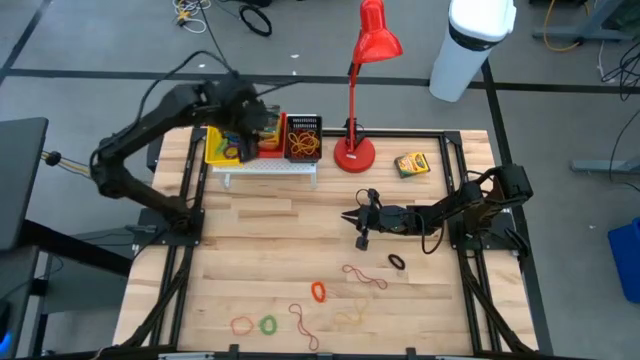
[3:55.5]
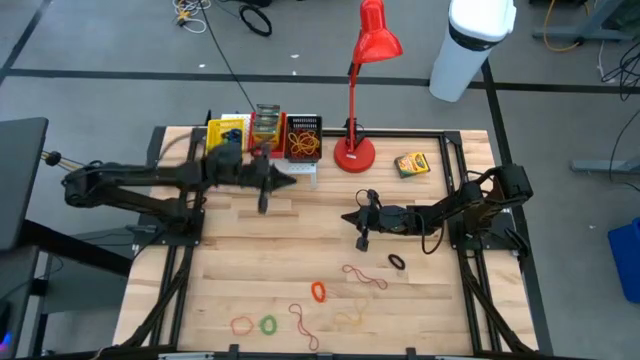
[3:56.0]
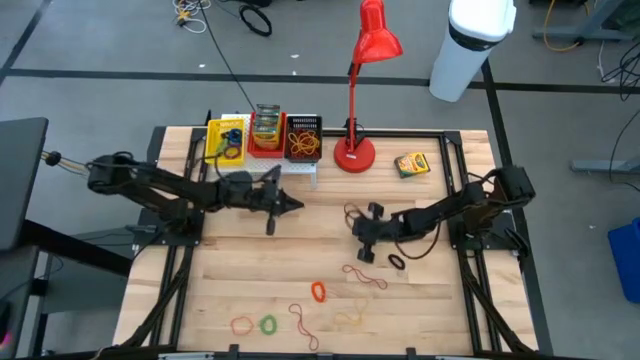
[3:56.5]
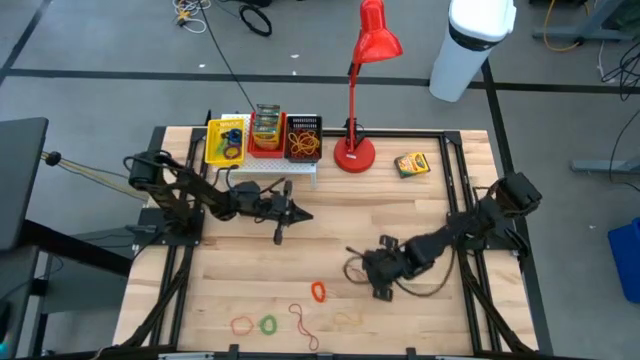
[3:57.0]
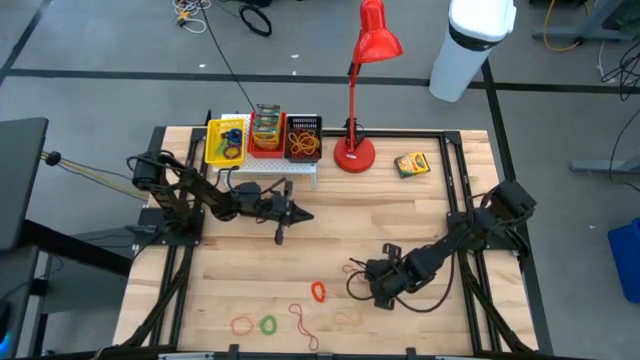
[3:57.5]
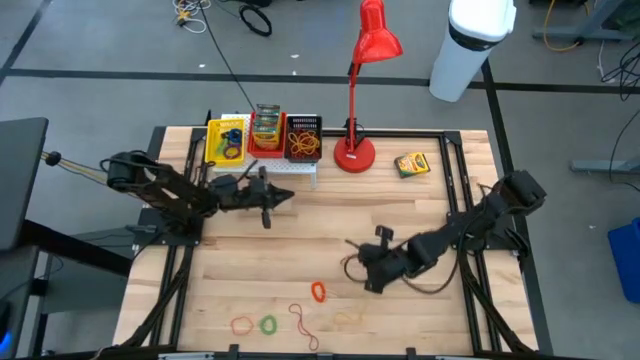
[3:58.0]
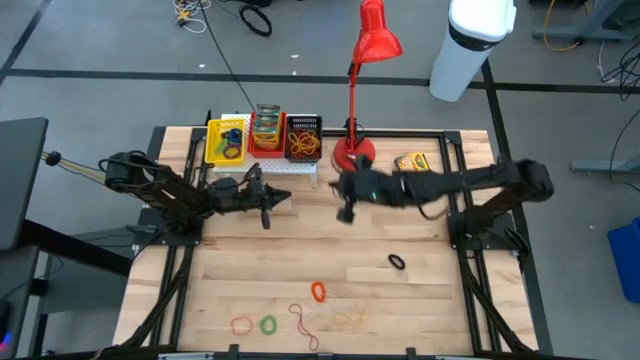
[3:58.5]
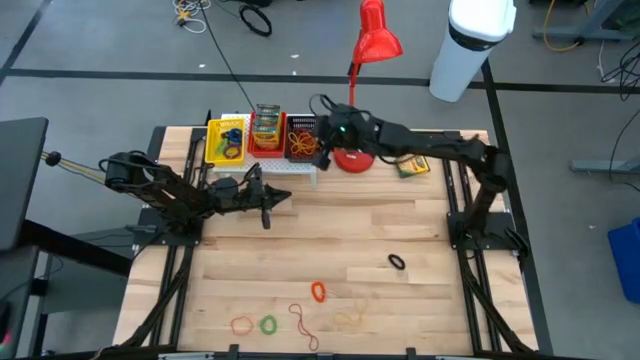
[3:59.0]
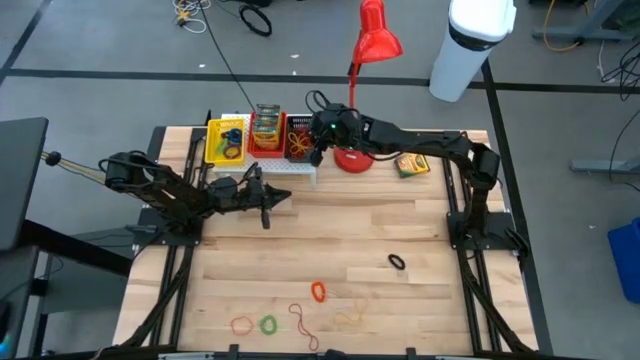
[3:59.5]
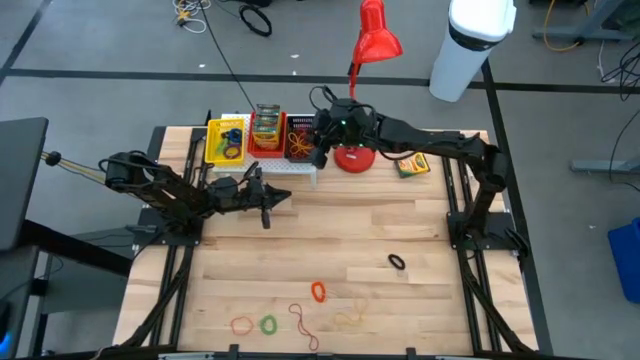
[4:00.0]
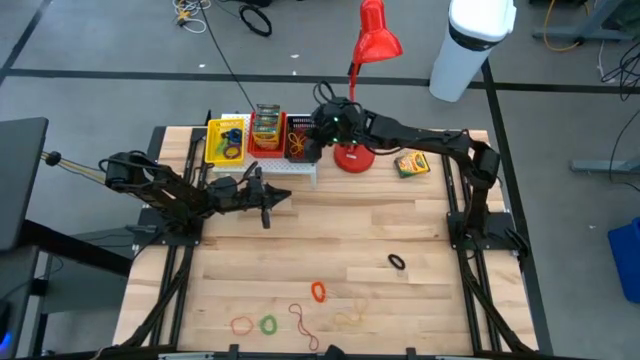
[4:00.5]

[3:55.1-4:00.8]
Task: Pick & Place Office Desk Supplies
Put the red rubber band into the black bin on the shelf

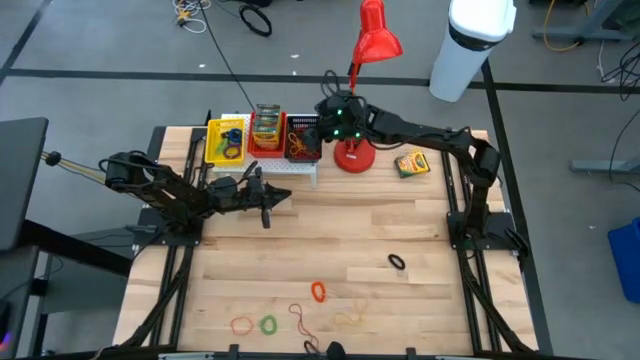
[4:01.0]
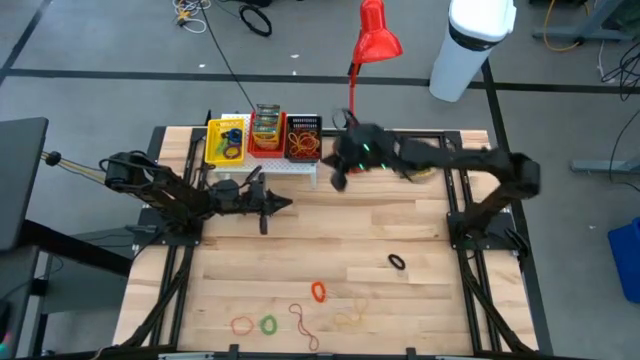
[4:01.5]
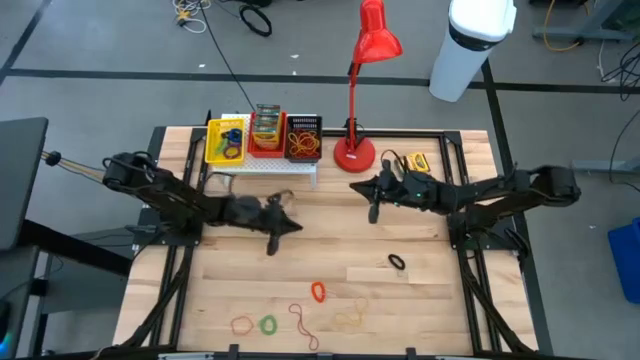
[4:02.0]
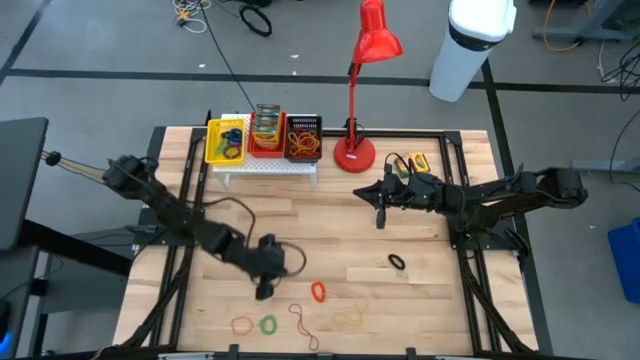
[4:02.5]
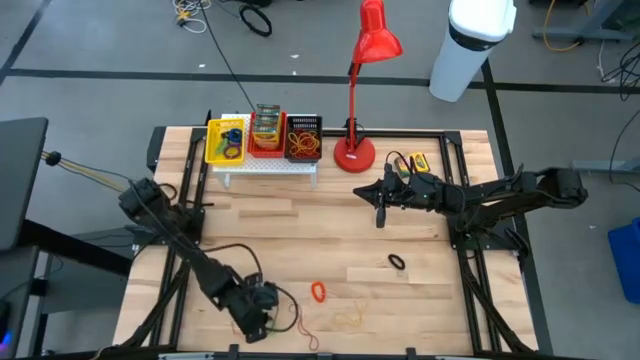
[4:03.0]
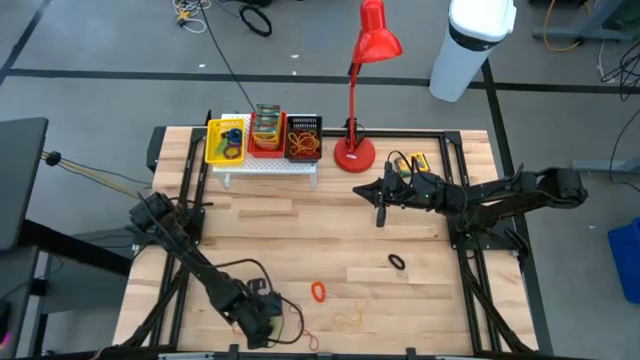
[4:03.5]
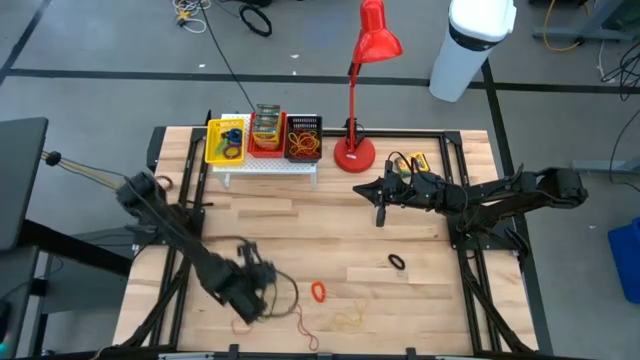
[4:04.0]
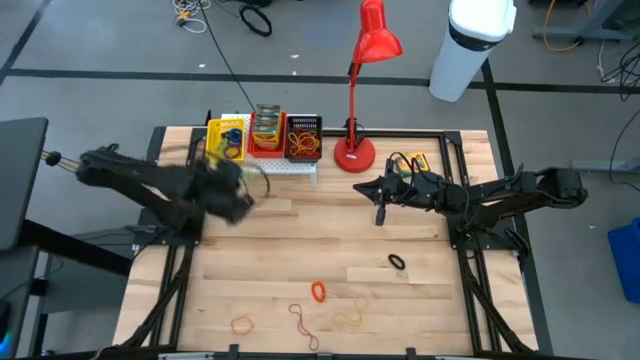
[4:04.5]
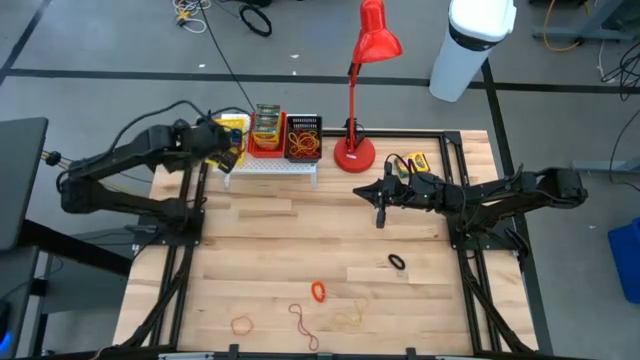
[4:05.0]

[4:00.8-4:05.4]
Put the green spring rubber band into the yellow bin on the shelf

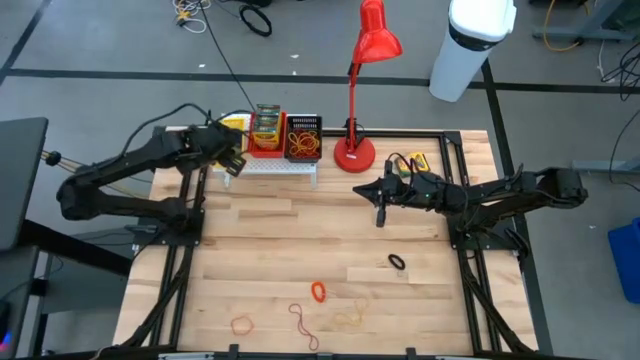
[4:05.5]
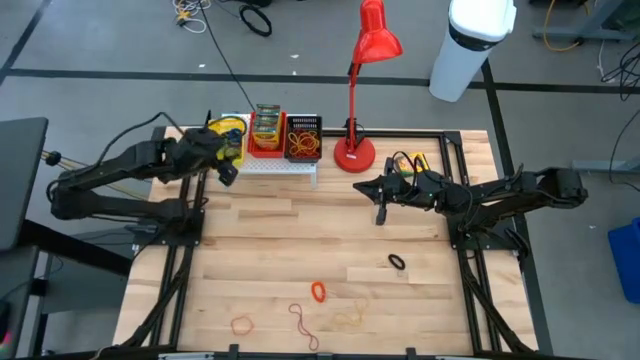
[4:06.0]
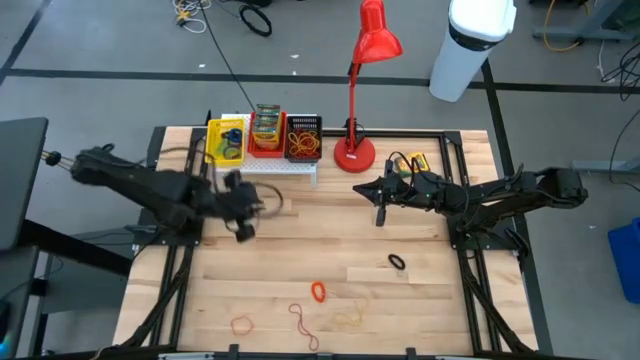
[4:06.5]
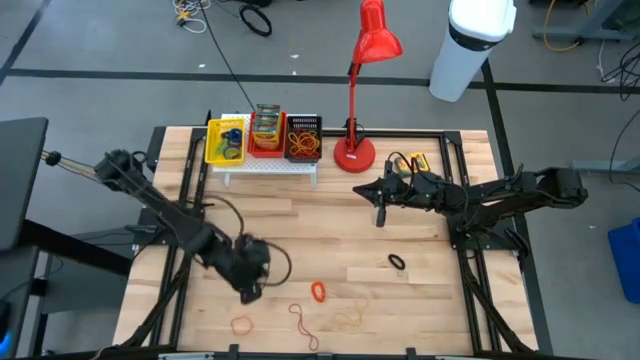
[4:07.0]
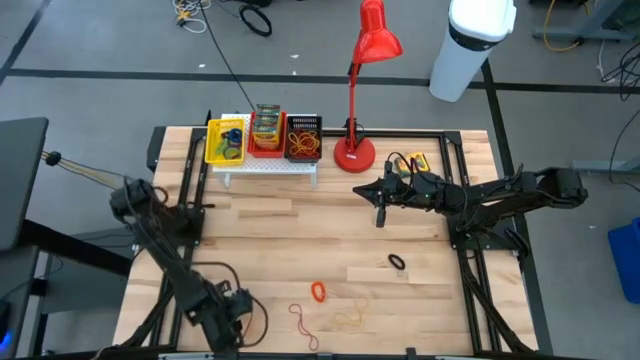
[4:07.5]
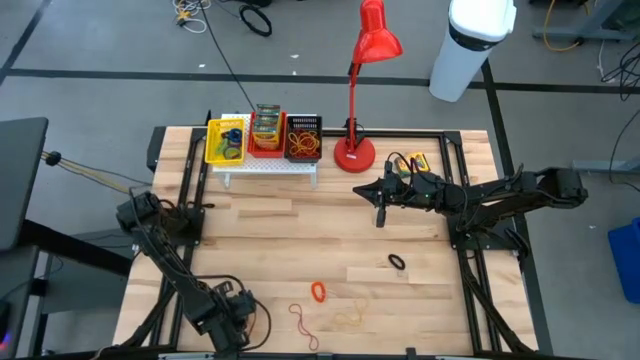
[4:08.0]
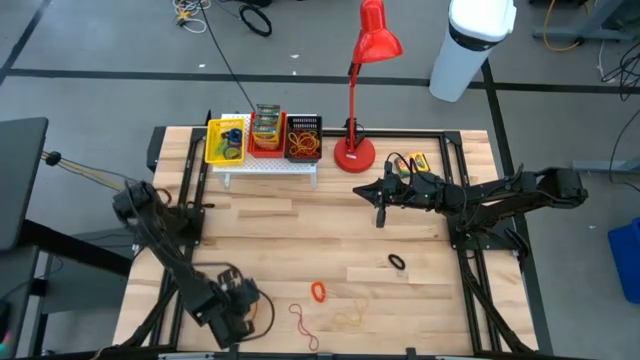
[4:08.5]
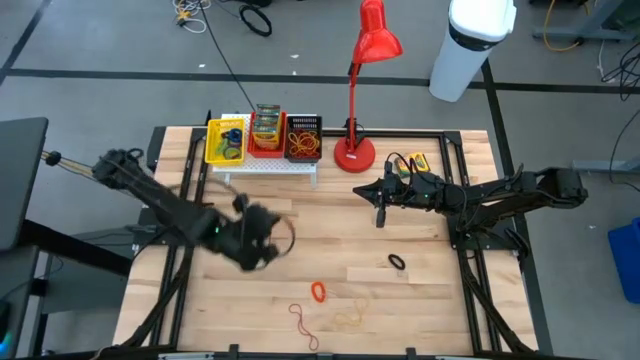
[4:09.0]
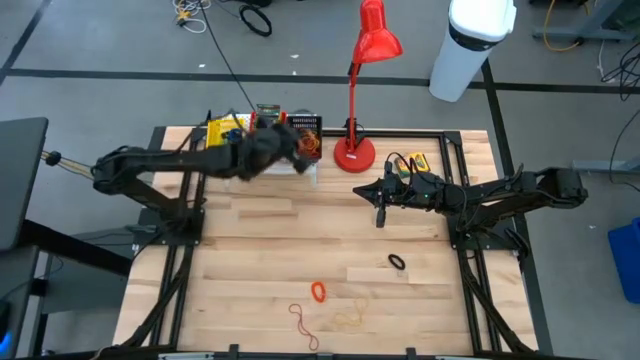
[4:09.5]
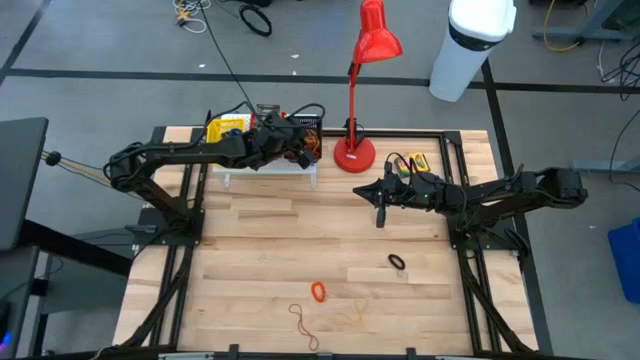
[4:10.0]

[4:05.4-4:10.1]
Put the orange rubber band into the black bin on the shelf

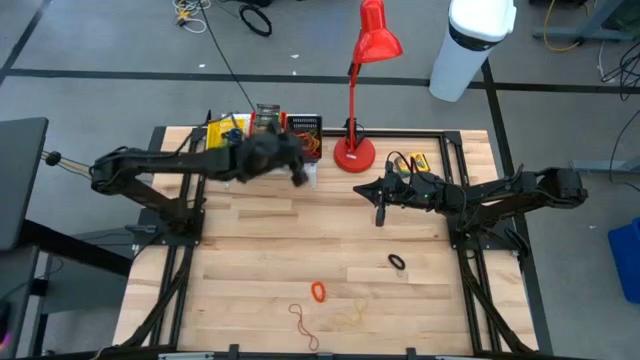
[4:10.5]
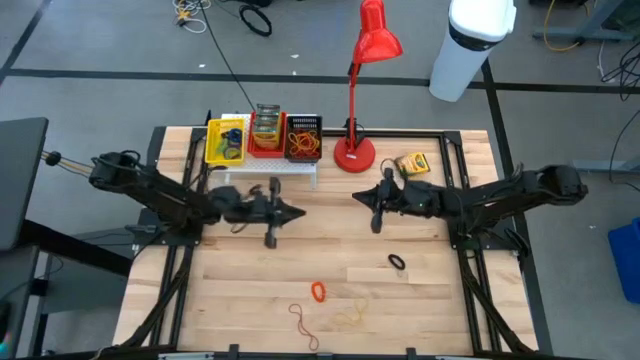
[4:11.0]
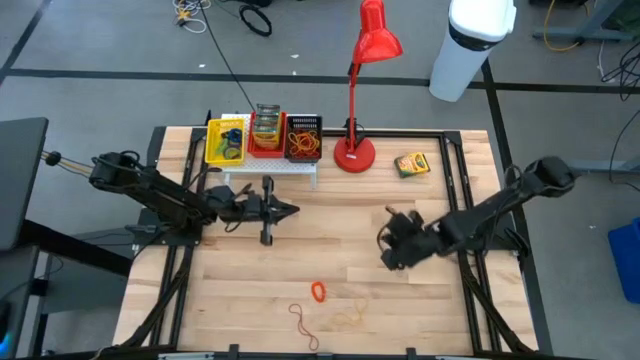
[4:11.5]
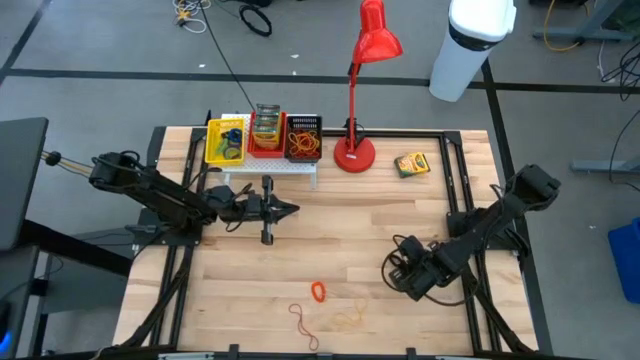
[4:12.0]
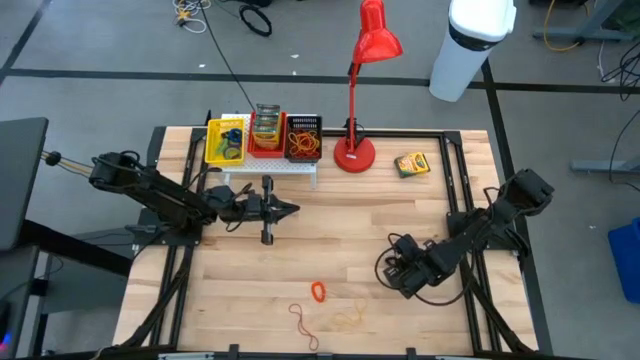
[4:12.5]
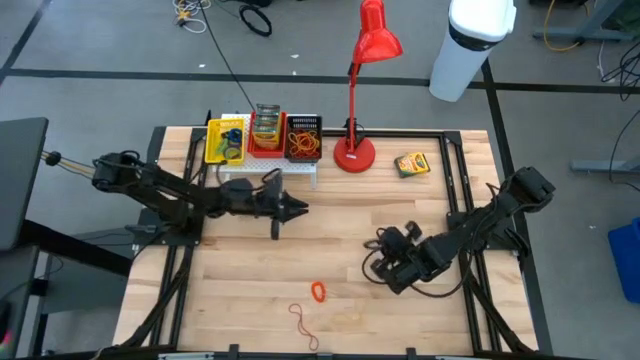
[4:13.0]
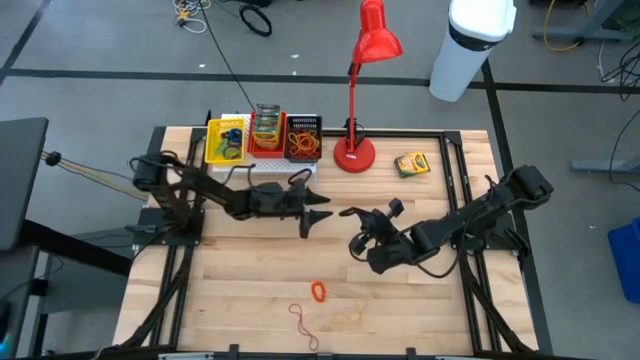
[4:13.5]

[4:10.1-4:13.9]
Put the black spring rubber band into the yellow bin on the shelf

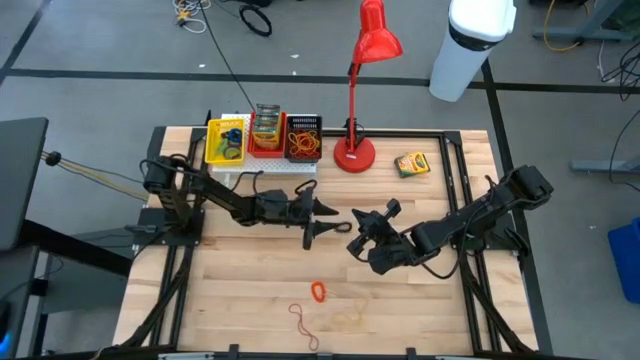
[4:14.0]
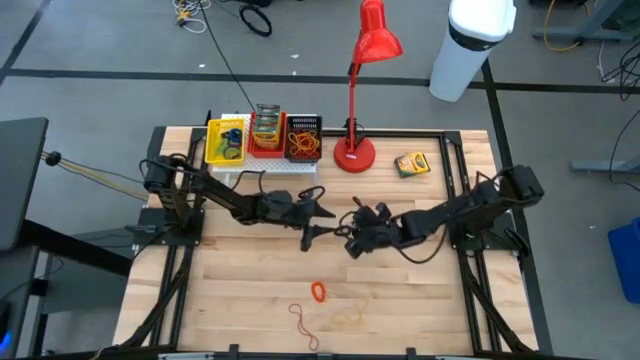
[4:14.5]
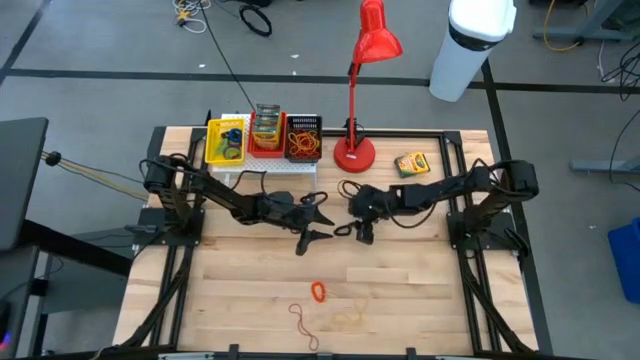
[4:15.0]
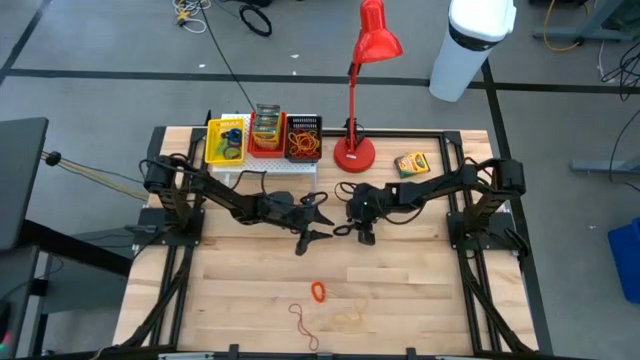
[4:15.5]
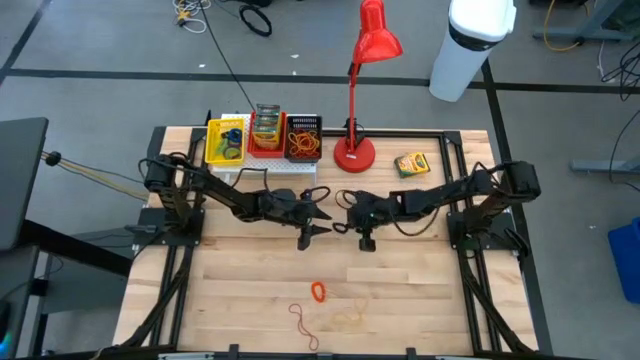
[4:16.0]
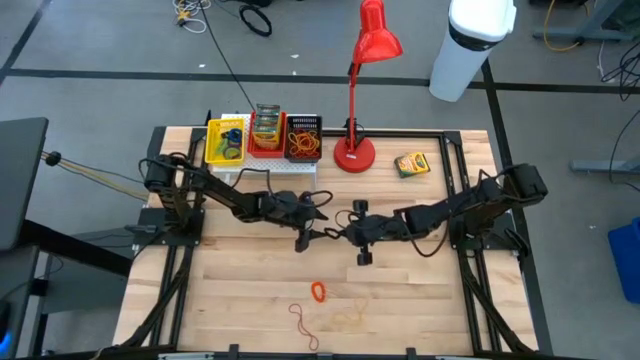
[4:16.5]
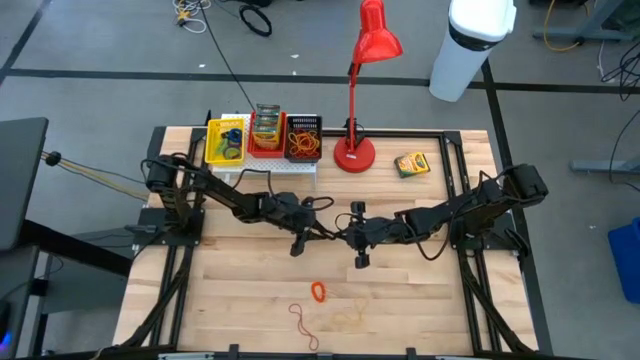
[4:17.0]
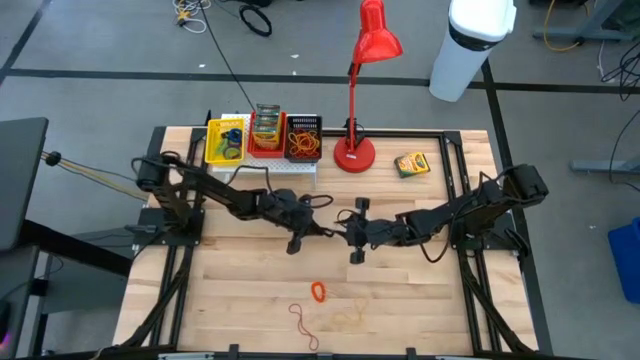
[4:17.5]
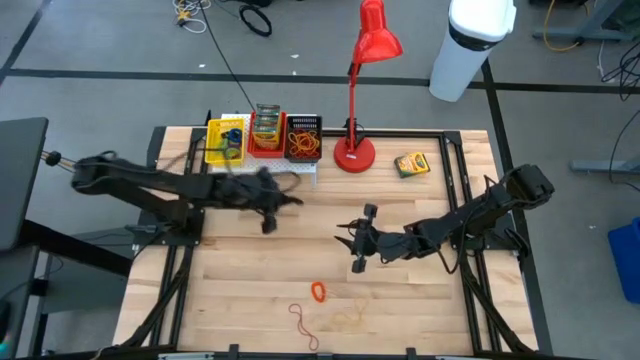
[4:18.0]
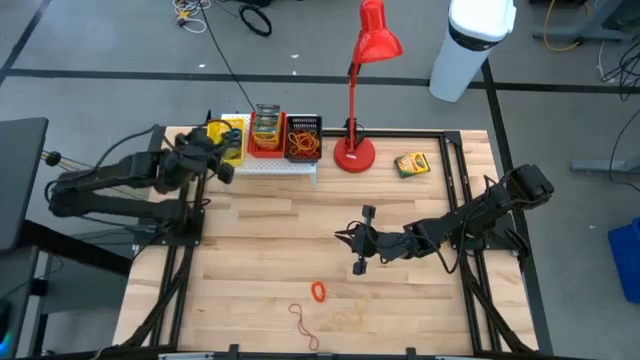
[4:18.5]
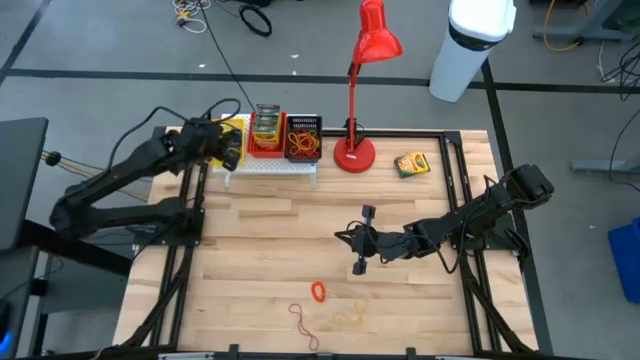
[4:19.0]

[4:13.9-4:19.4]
Put the black spring rubber band into the yellow bin on the shelf
